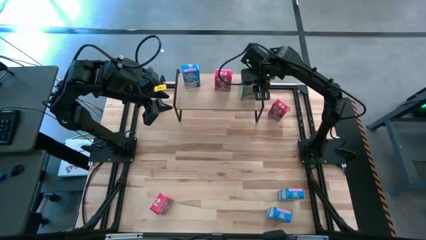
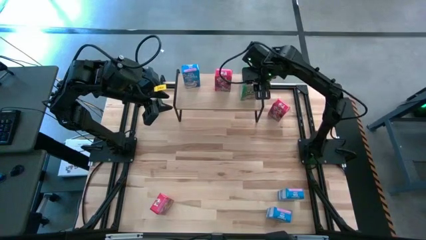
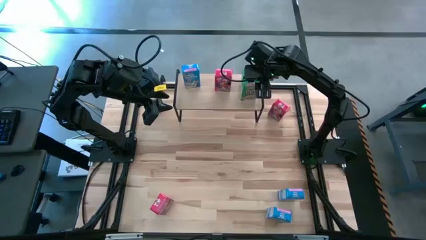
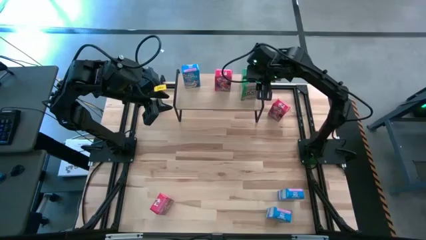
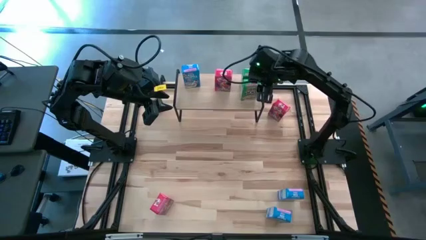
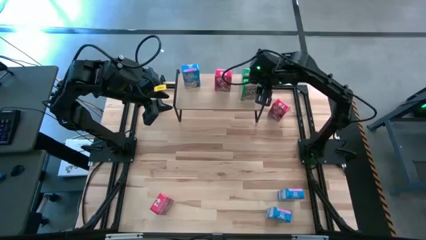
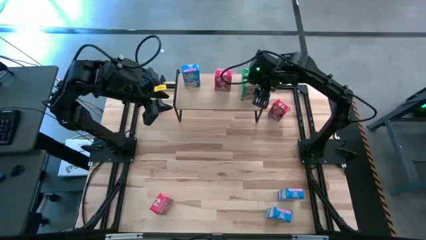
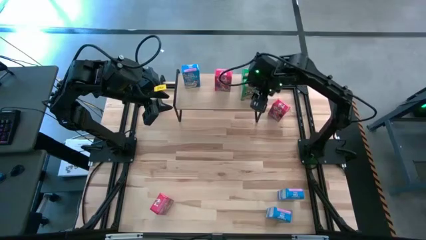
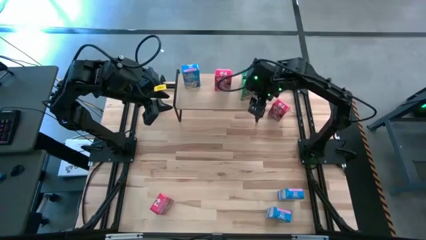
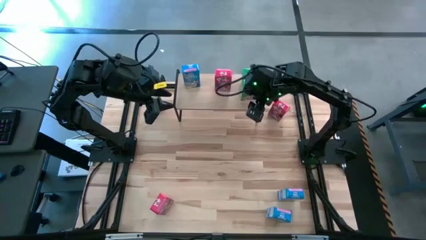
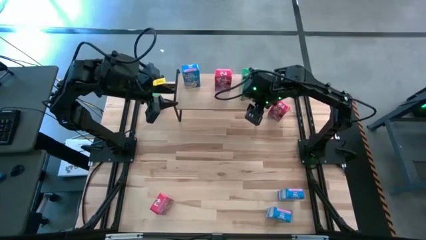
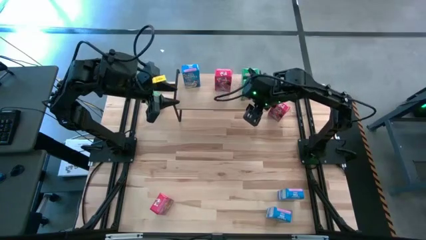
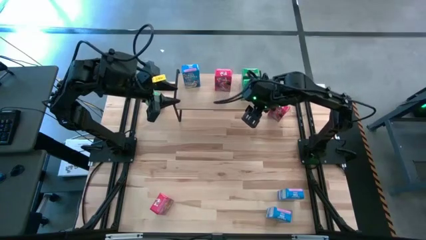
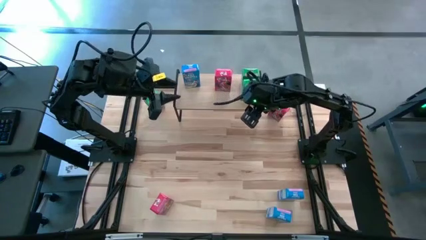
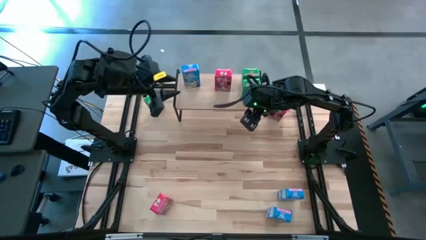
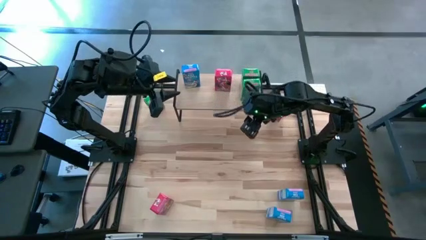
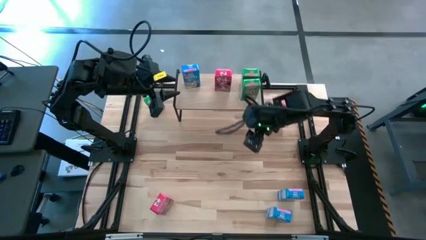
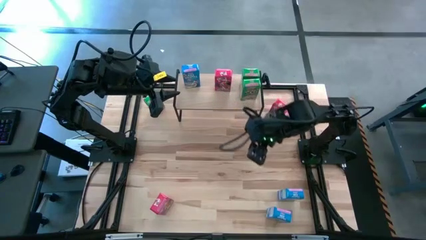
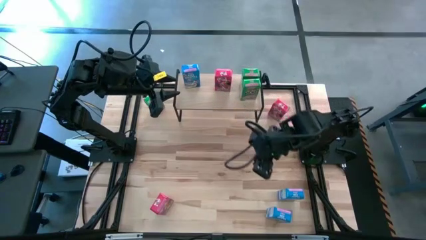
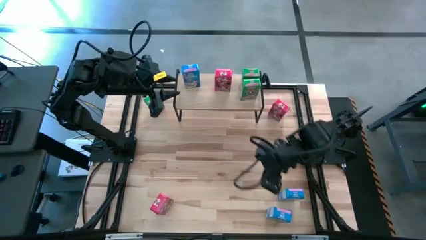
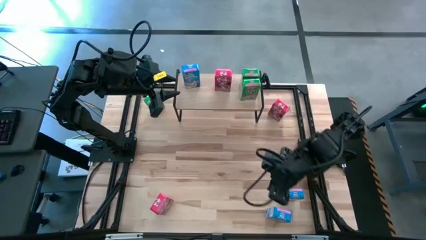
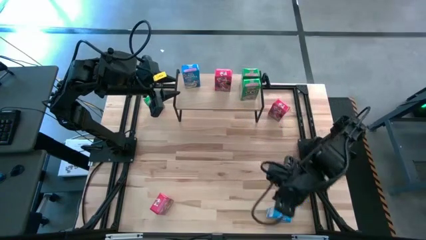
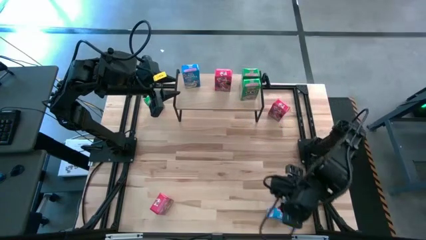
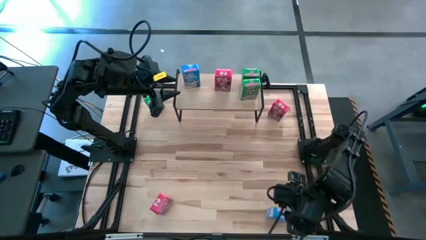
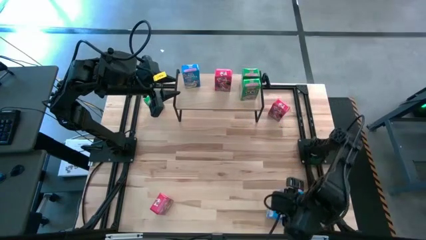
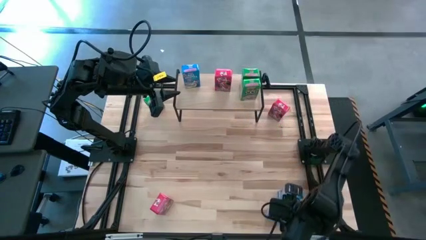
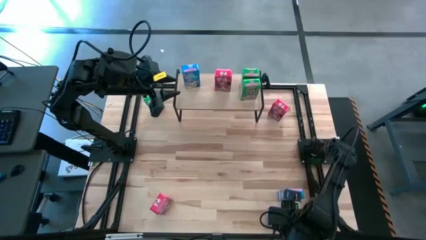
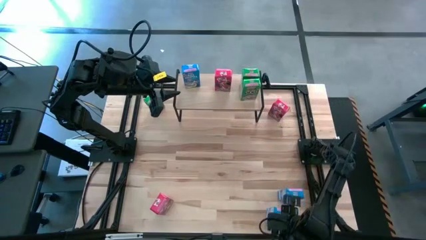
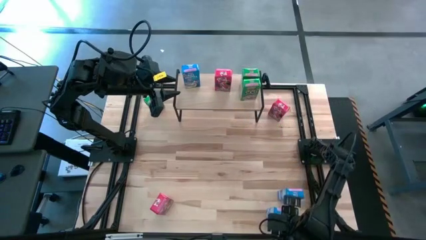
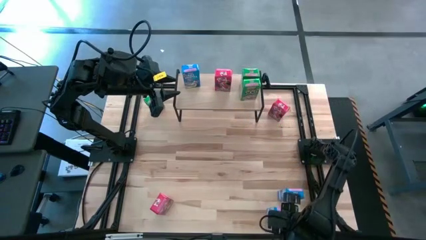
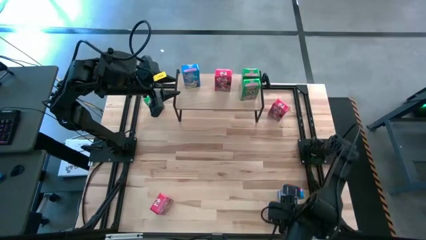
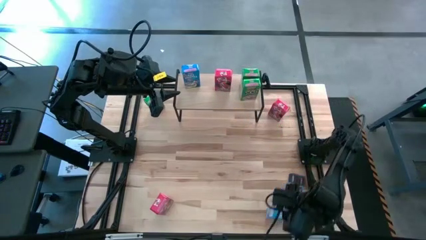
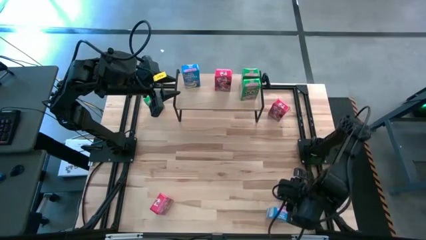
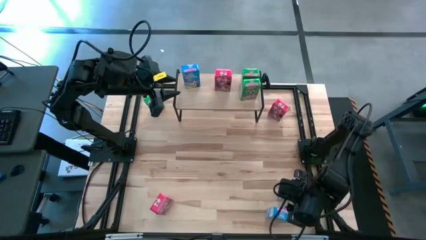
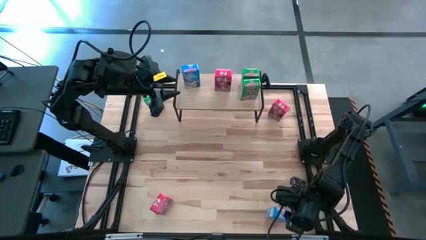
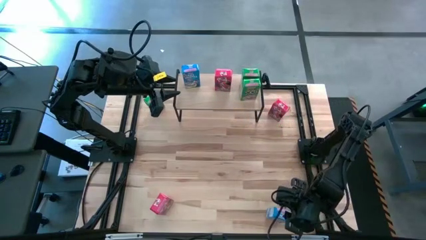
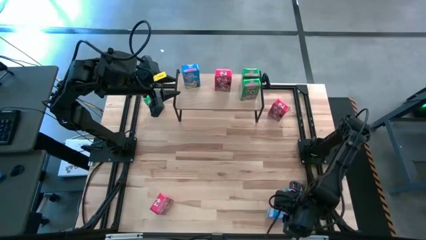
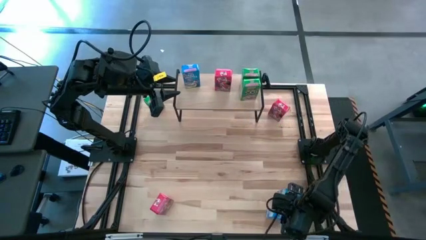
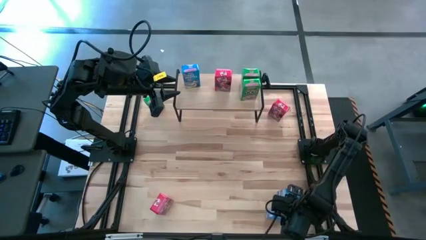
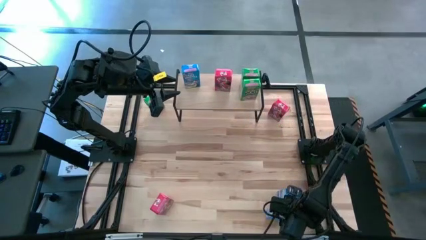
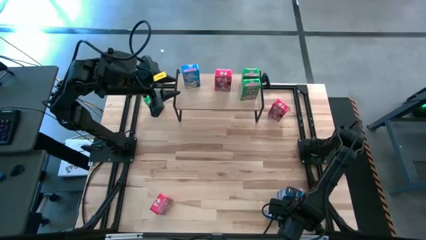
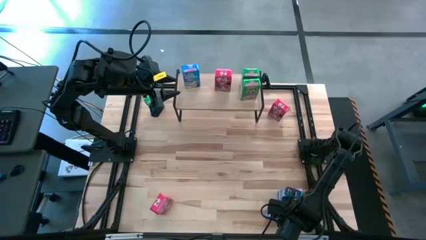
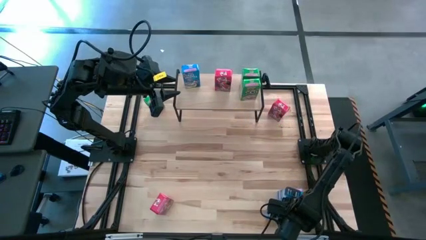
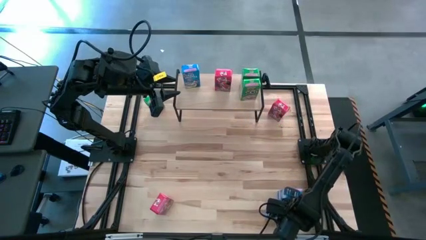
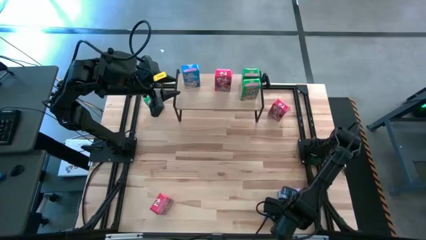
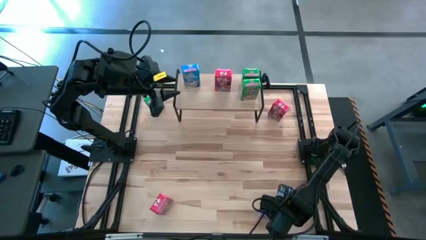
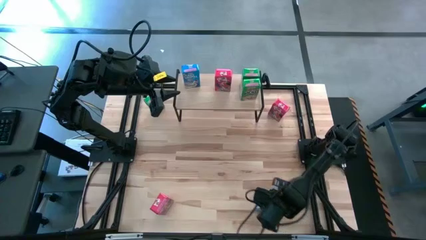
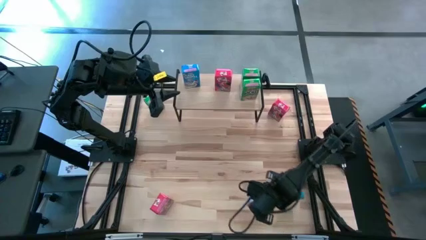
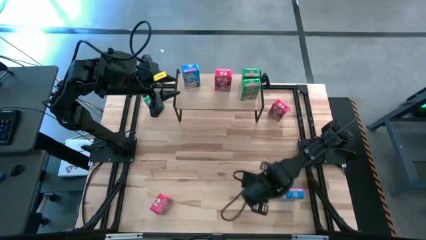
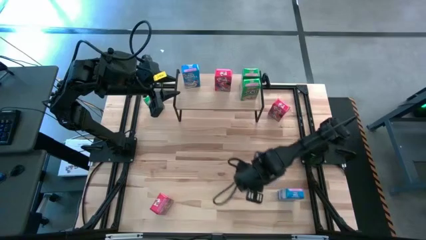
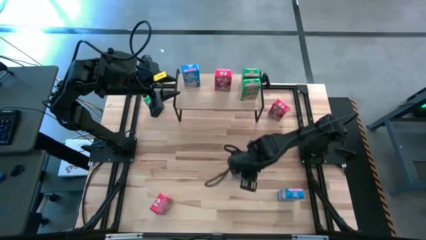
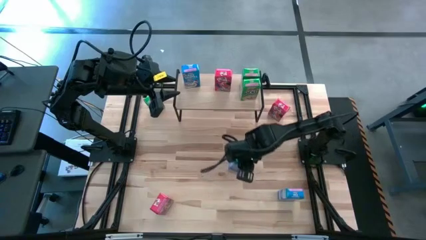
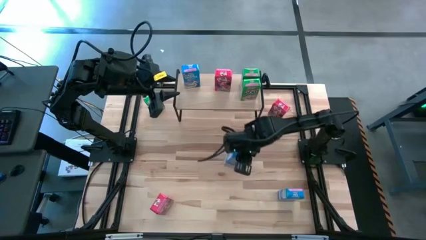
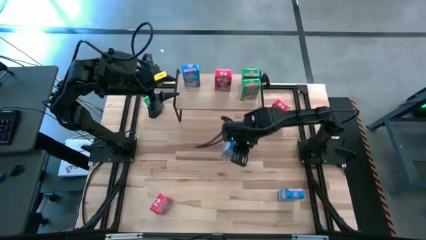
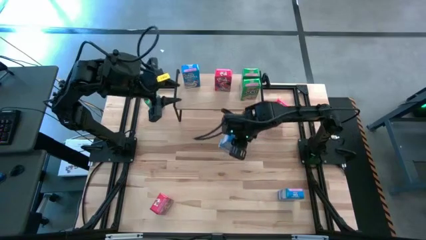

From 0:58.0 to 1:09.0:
Task: Stack cereal on shelf
Put the bottom blue cereal box on the shelf aligned with the other blue cereal box

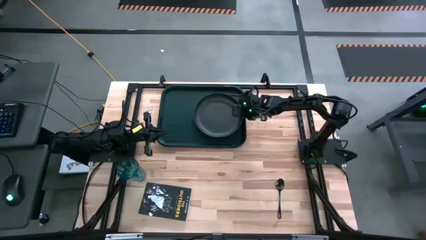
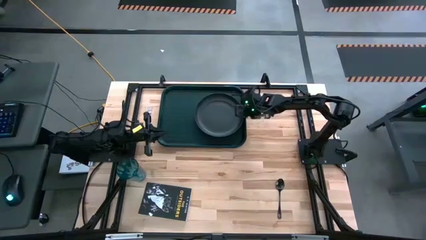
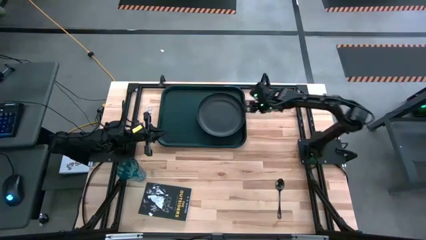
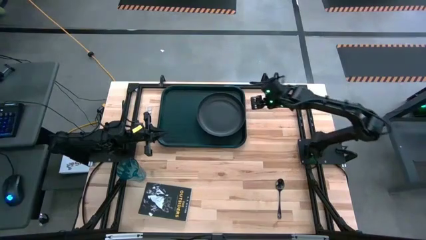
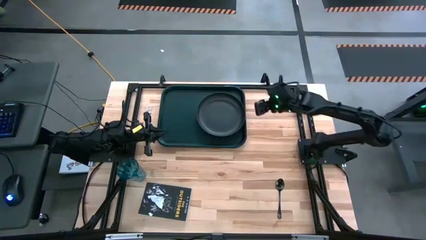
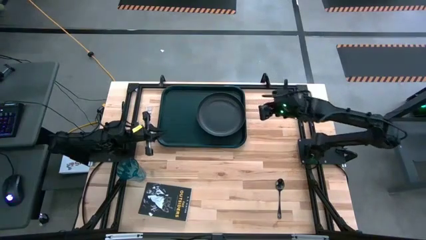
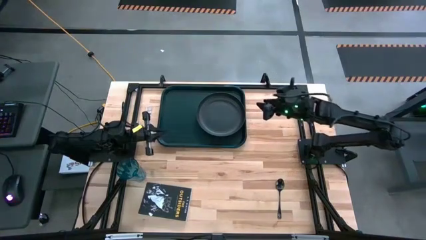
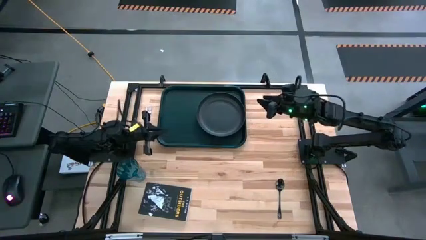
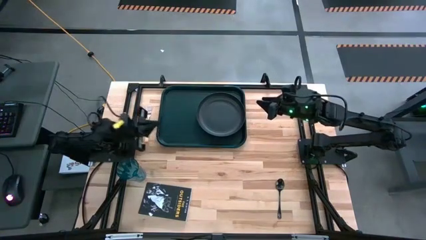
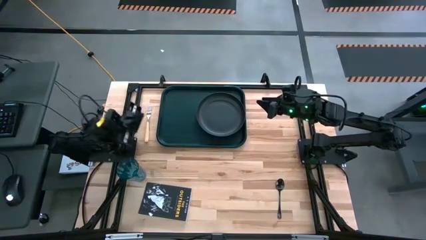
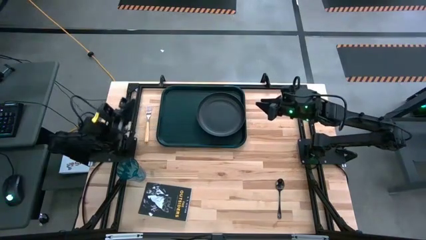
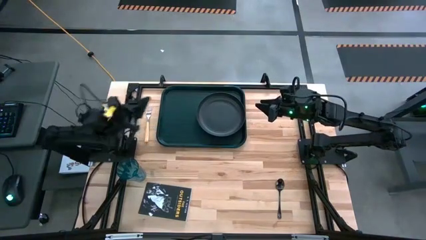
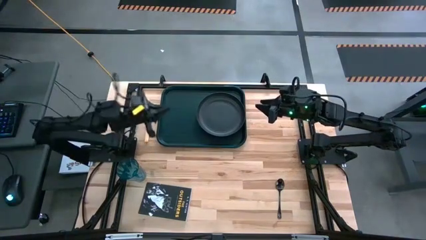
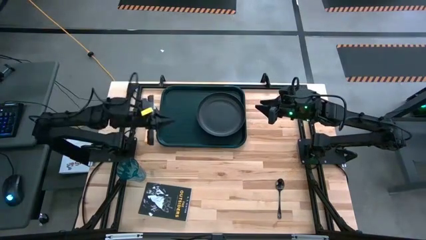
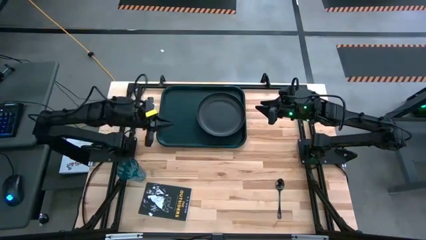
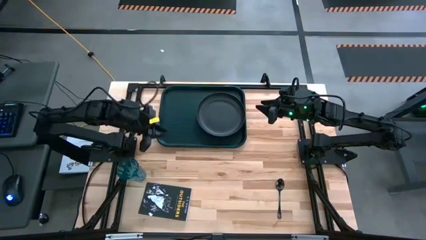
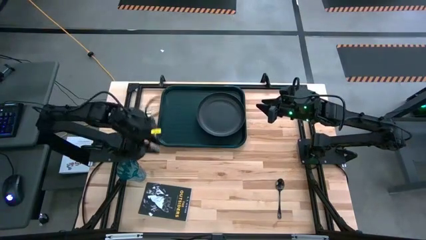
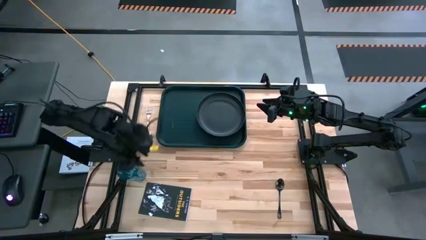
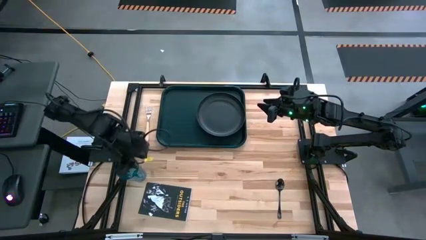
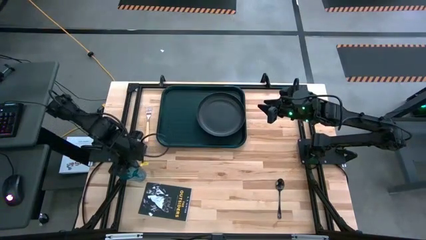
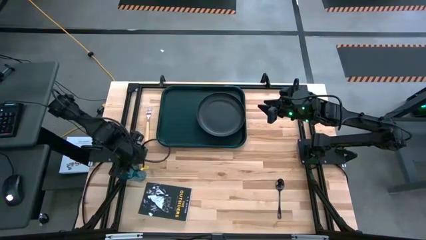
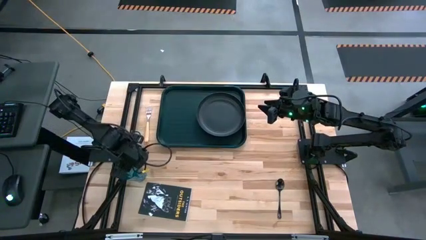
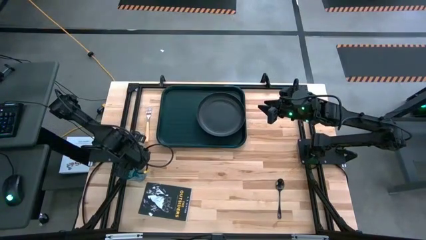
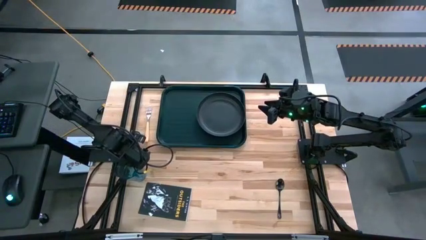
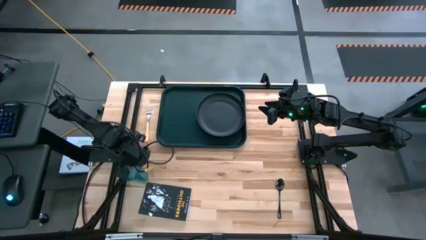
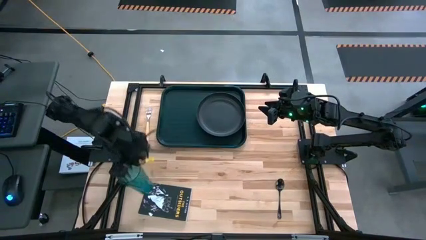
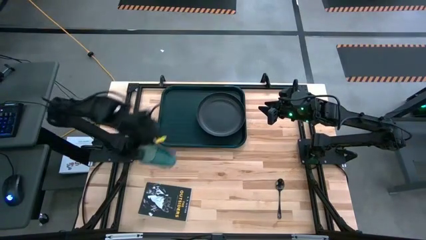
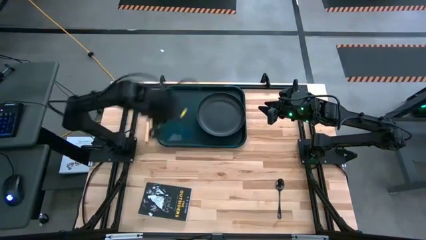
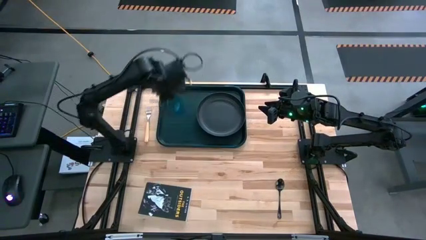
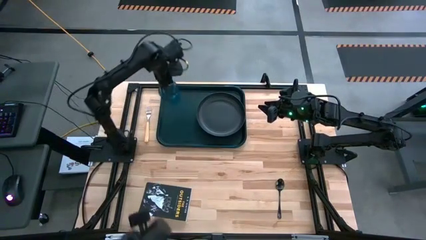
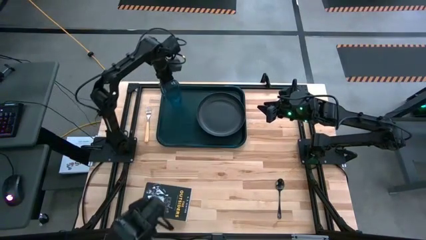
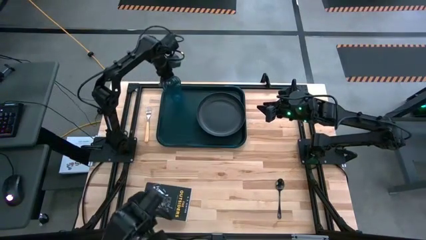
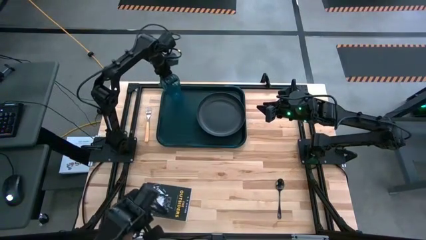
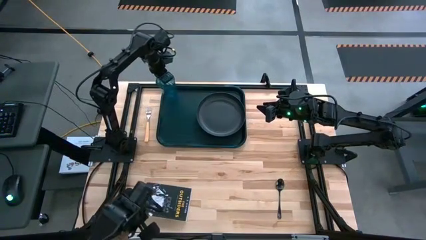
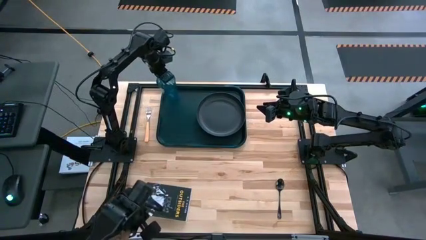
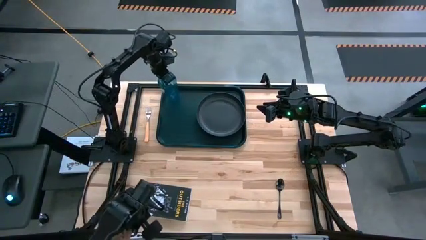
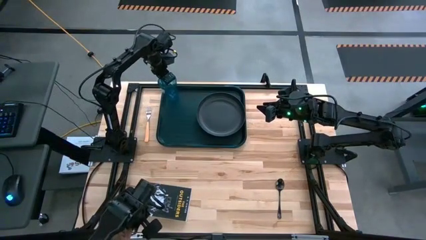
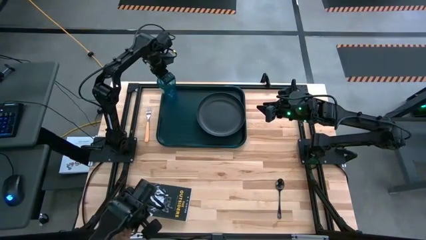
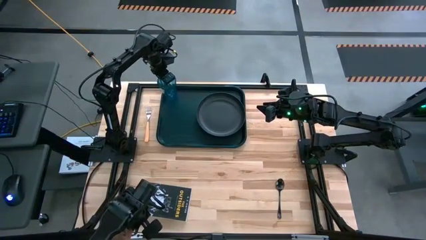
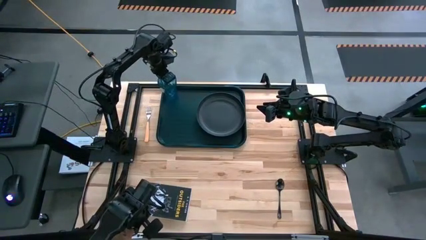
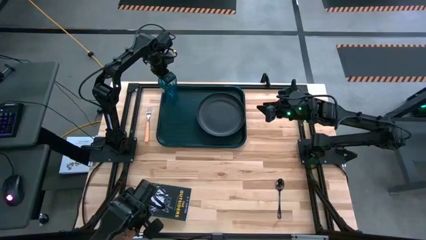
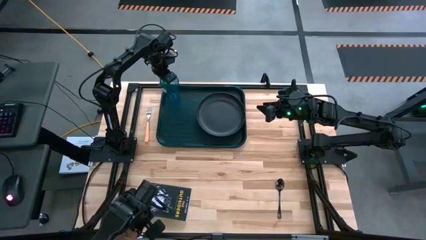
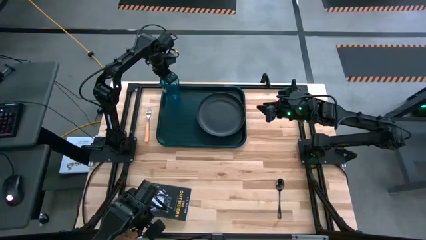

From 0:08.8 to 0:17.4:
Task: Pick and place plate/cup/fork/spoon on tray
Put the blue cup to the top left corner of the dark green tray
